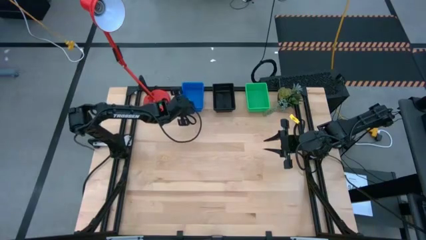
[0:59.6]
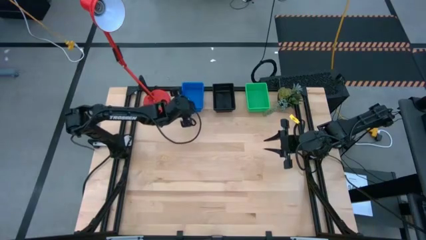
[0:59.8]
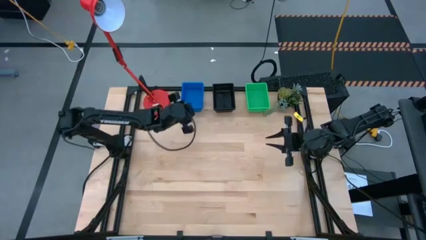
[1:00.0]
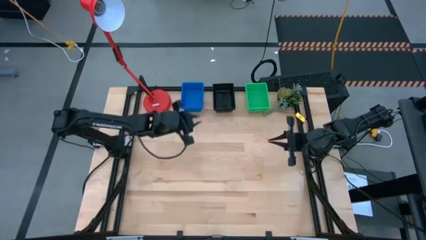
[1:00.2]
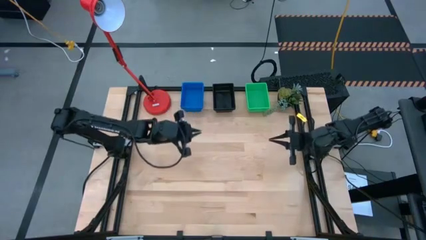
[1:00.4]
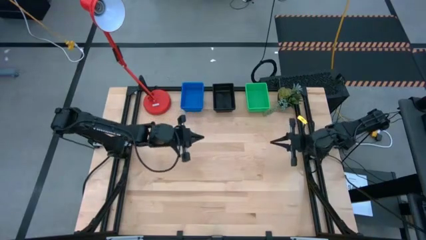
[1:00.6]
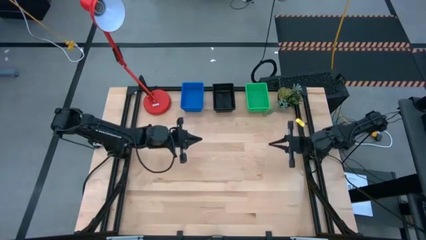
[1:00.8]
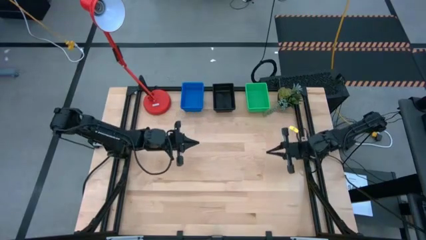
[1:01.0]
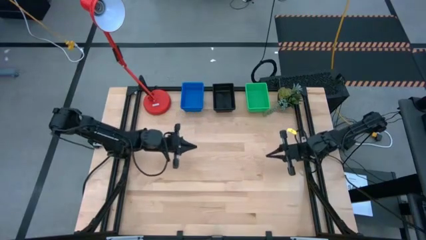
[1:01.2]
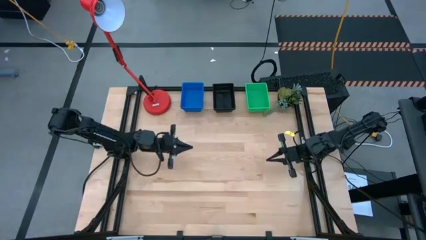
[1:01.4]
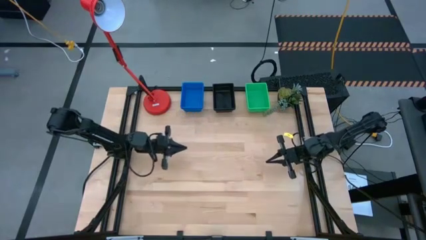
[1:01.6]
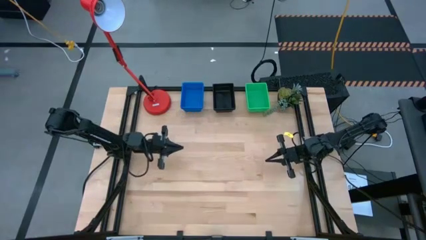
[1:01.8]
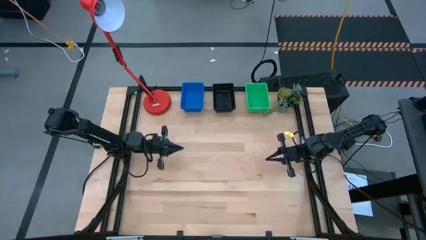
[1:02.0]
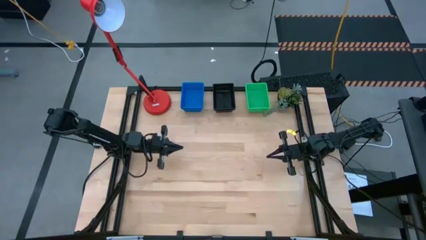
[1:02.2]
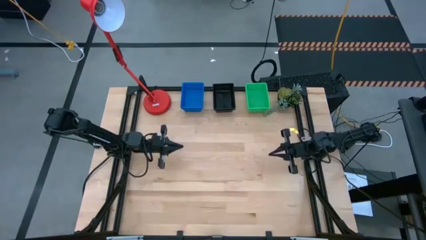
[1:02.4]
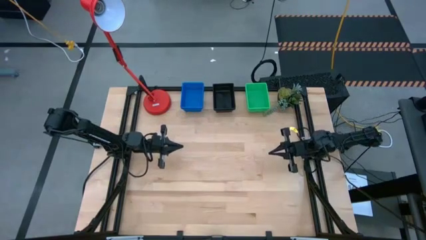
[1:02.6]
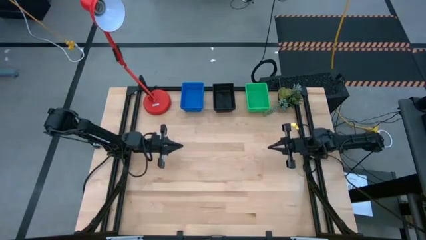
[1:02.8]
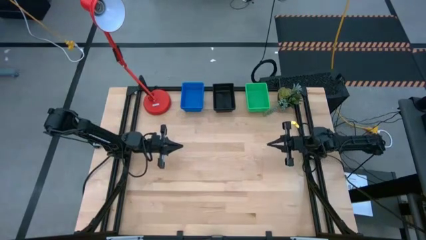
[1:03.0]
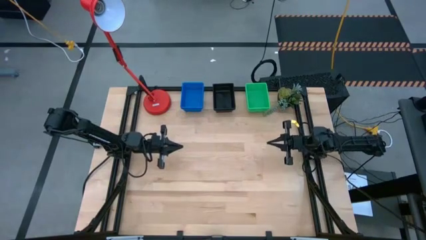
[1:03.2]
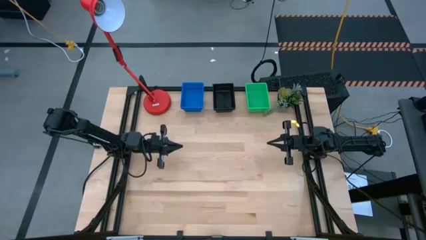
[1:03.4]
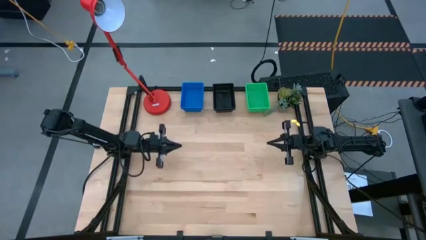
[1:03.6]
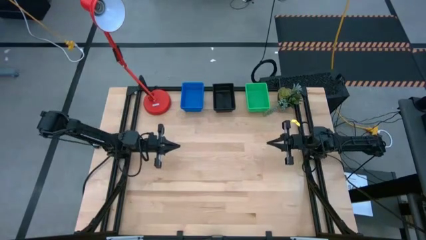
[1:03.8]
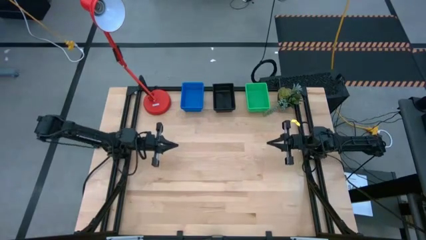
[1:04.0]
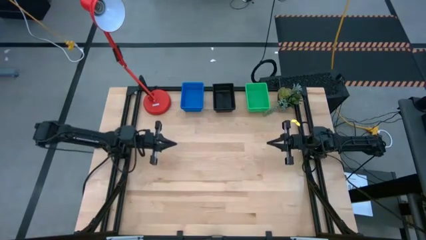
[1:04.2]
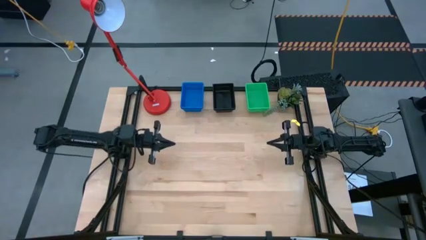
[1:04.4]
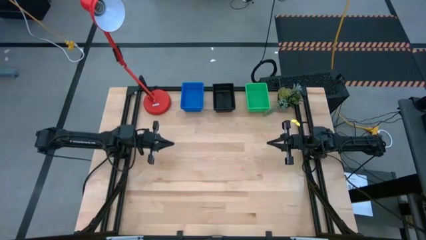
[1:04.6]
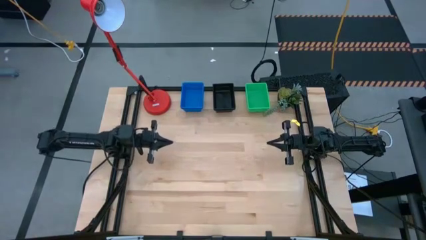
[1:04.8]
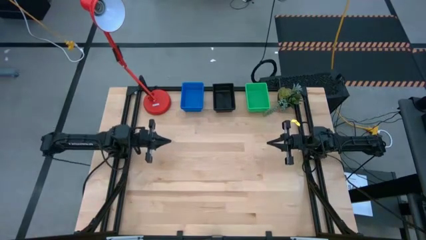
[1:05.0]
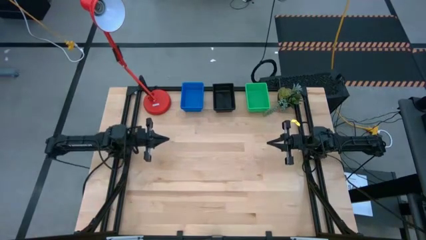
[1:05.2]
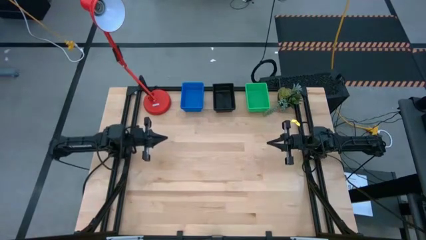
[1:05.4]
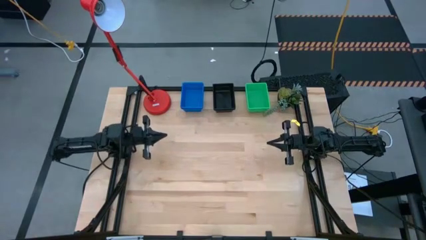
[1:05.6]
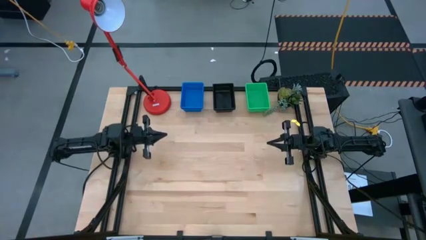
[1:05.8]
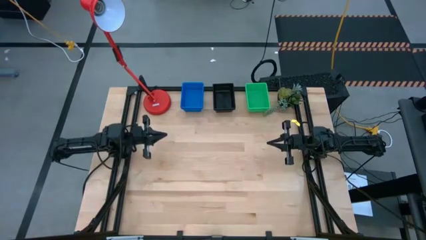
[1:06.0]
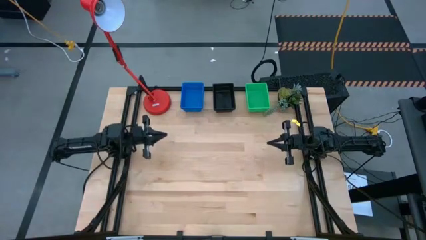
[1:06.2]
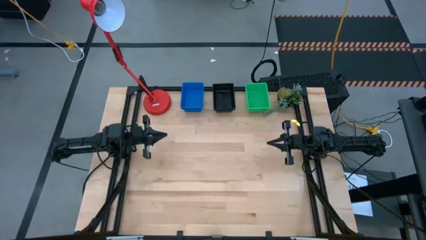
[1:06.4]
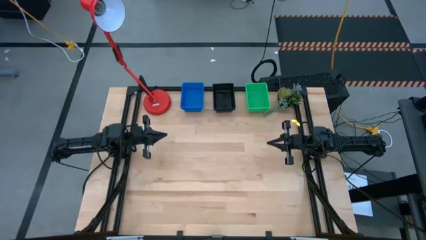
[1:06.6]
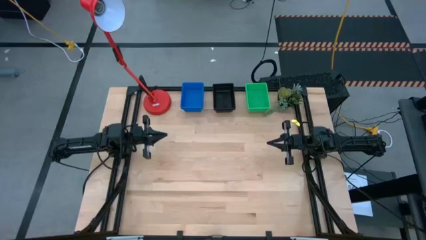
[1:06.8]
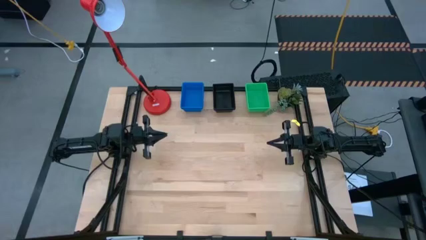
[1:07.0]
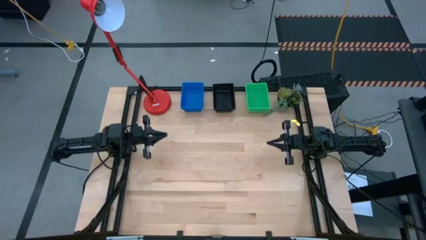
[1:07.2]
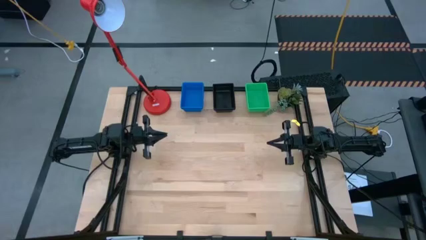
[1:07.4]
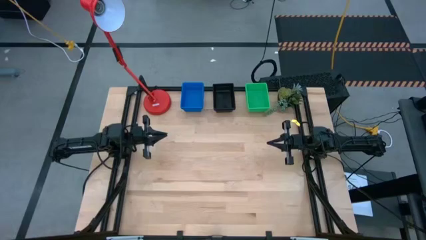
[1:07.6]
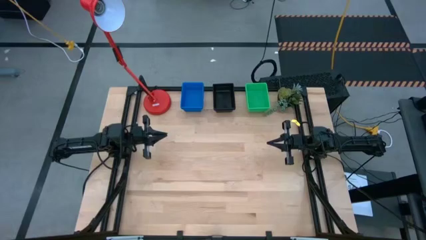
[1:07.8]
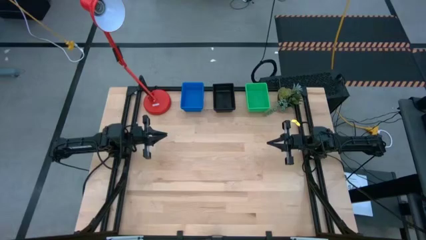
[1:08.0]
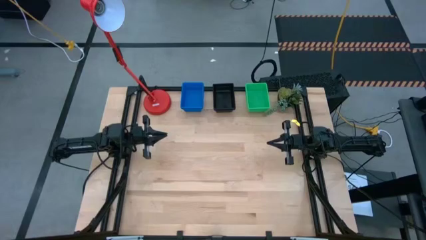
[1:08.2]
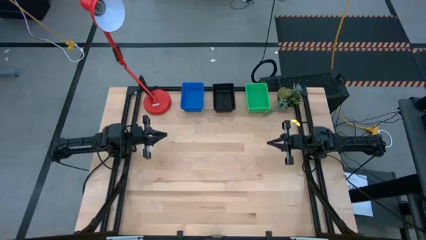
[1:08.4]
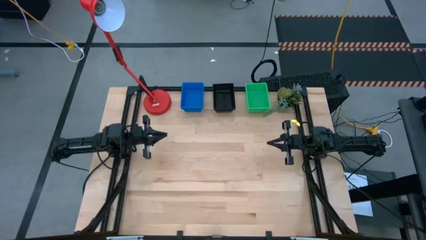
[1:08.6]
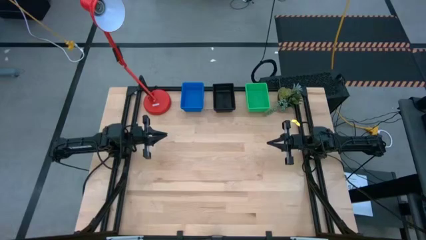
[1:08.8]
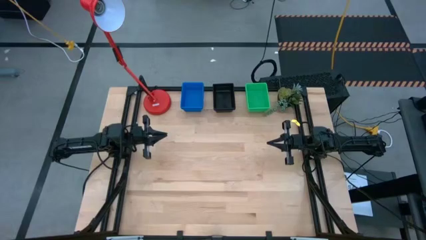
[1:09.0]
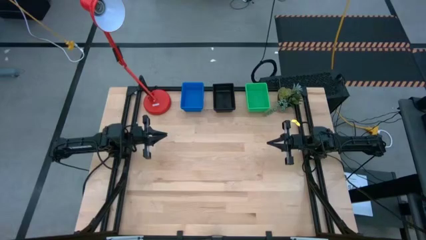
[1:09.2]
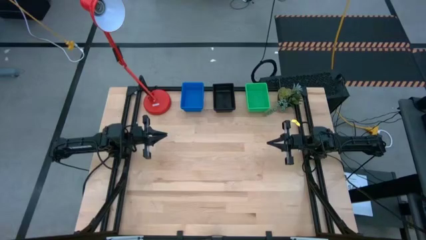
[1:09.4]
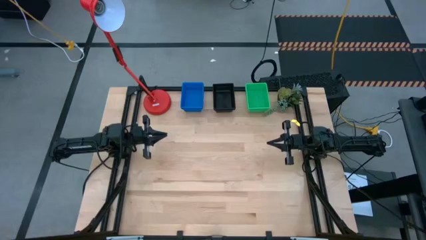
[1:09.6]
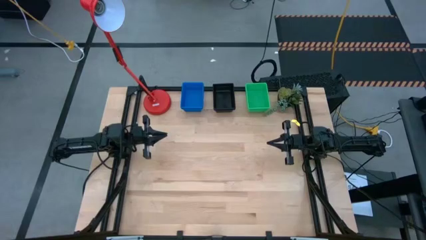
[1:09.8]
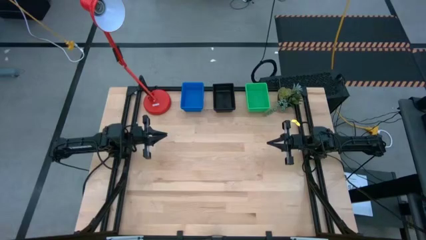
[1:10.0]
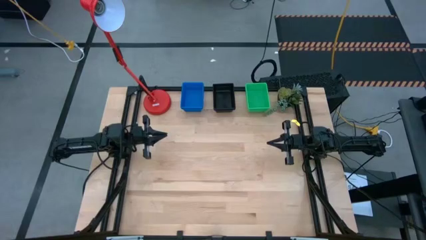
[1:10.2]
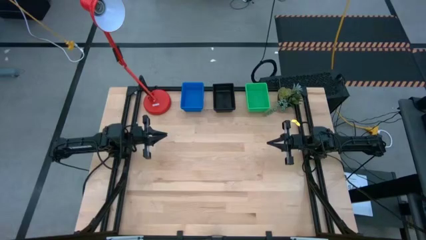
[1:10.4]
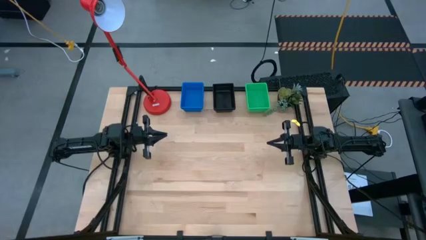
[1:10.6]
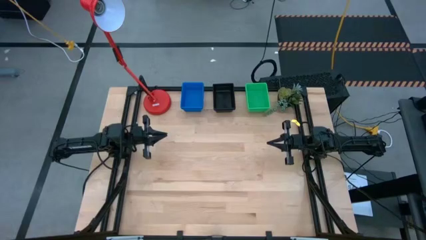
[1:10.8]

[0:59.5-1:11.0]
Return to Home Position
